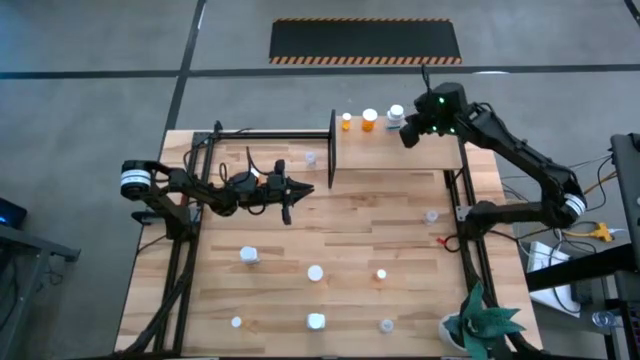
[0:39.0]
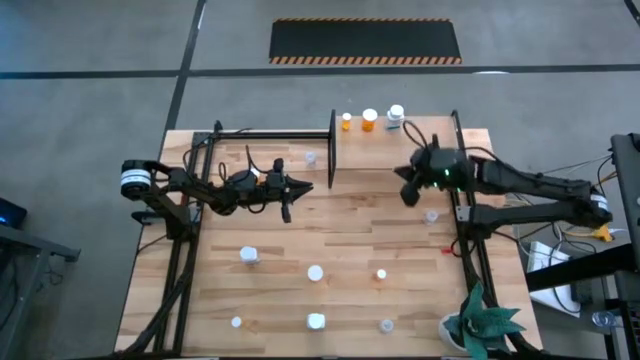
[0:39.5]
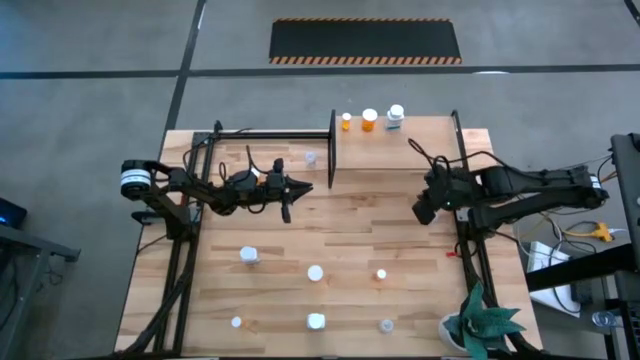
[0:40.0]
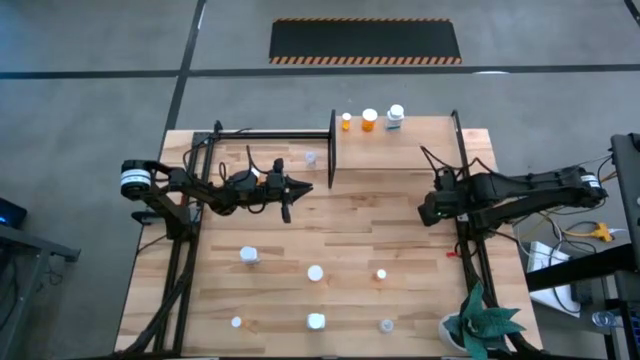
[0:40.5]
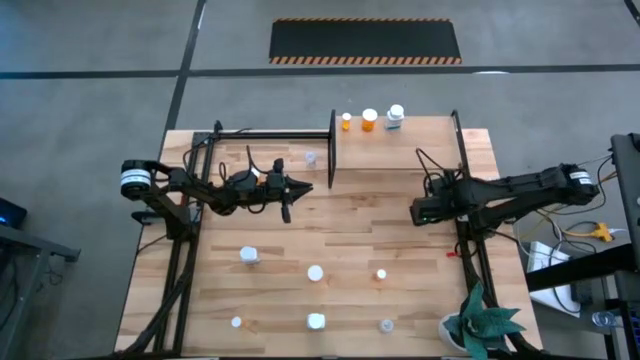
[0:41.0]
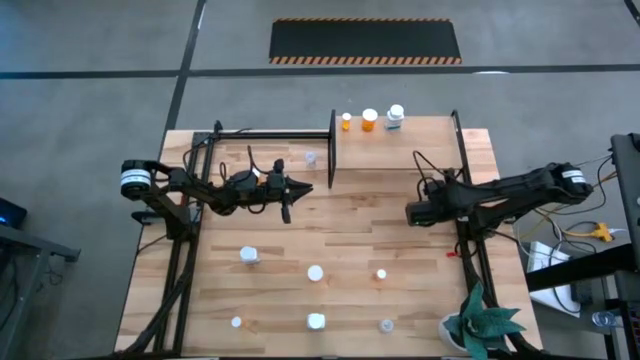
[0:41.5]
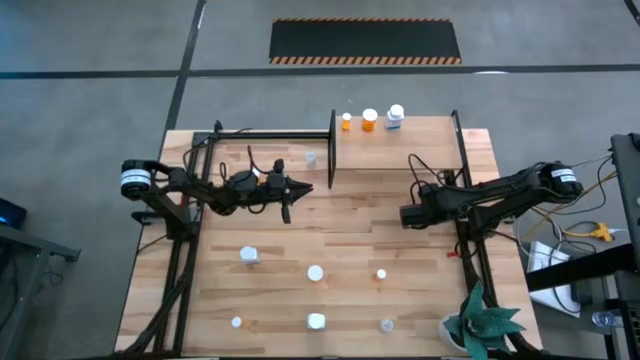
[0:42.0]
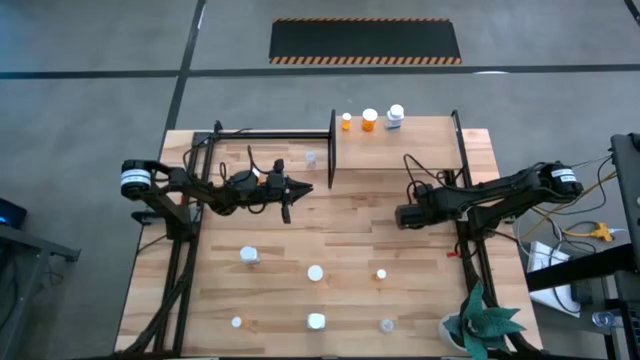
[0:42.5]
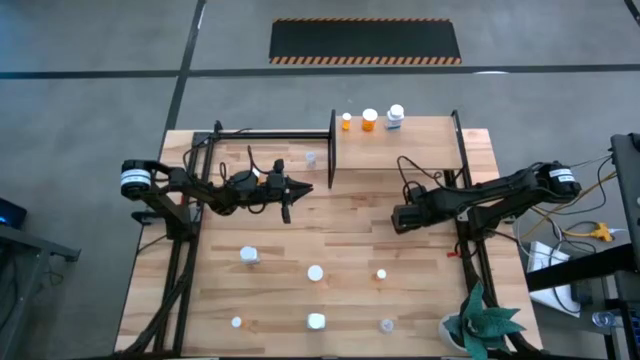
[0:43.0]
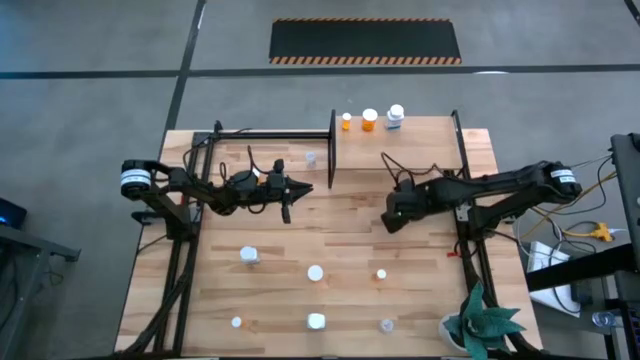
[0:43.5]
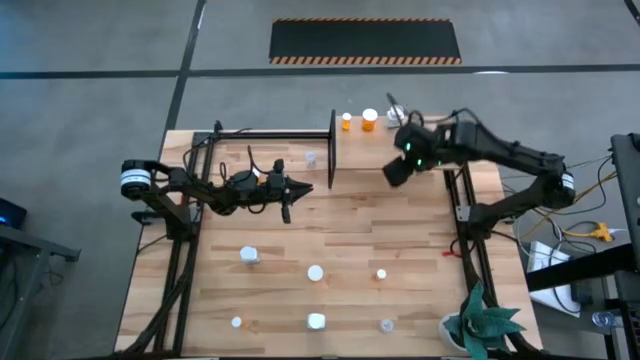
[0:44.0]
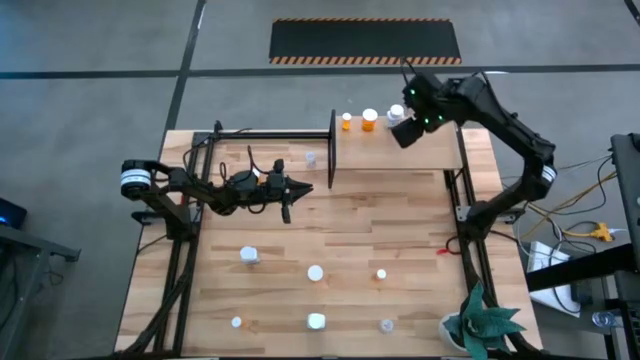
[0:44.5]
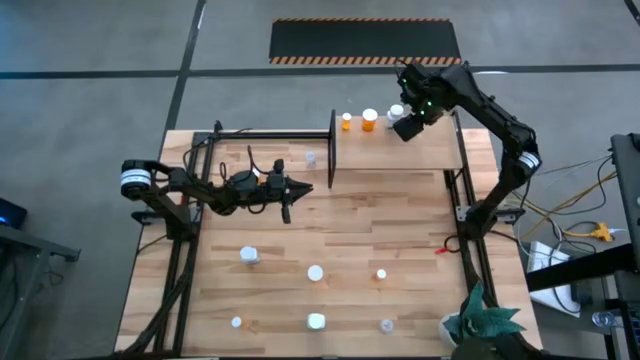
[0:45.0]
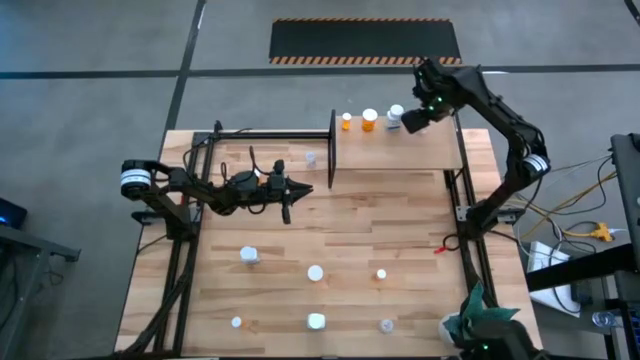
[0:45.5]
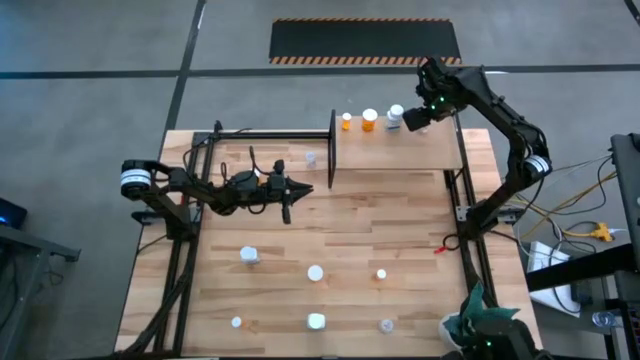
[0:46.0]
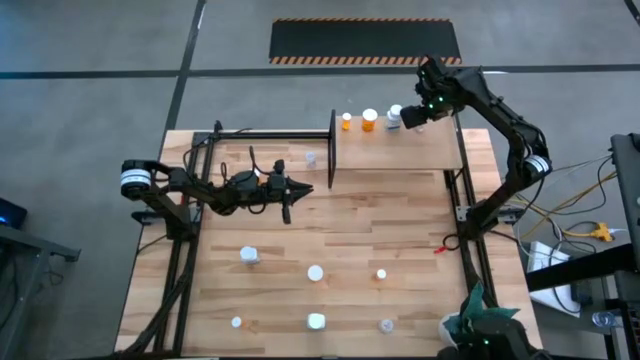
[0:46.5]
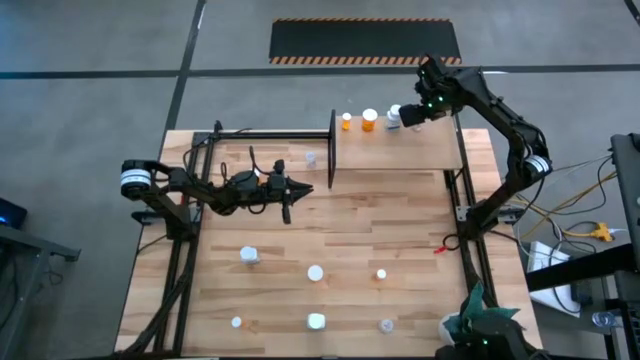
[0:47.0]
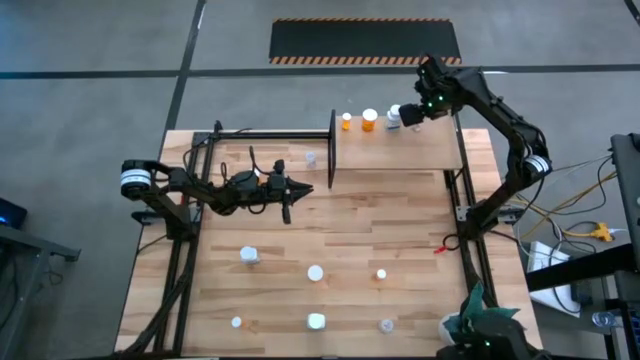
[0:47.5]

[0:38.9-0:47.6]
Task: Pick and place medicine bottles onto shelf by color
Put the middle transparent pill bottle on the shelf

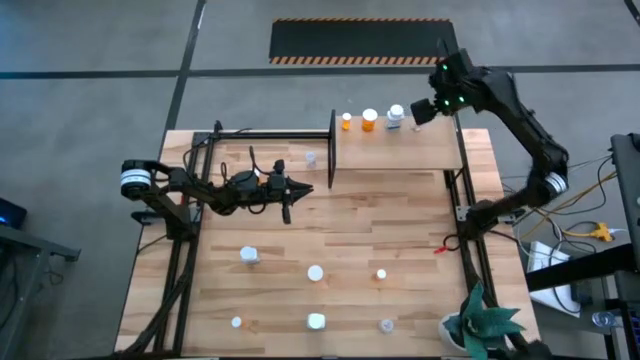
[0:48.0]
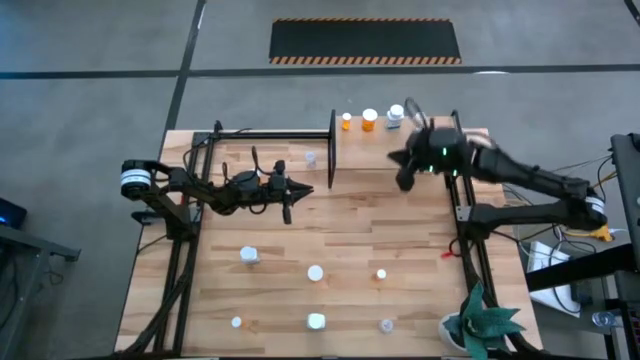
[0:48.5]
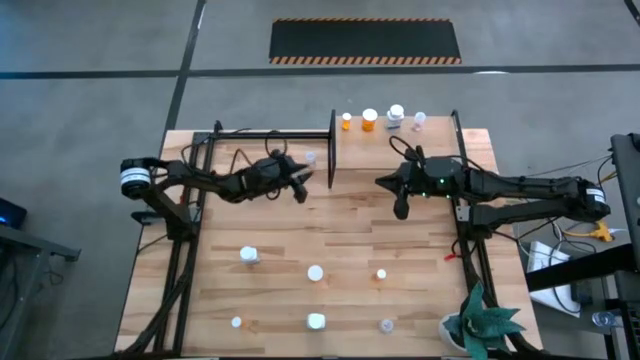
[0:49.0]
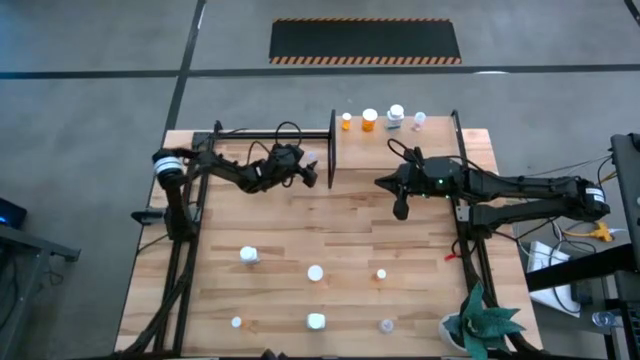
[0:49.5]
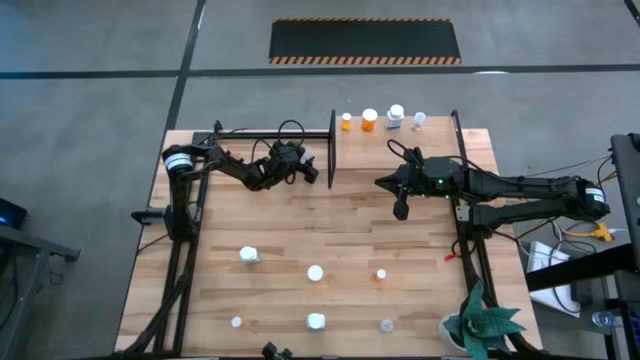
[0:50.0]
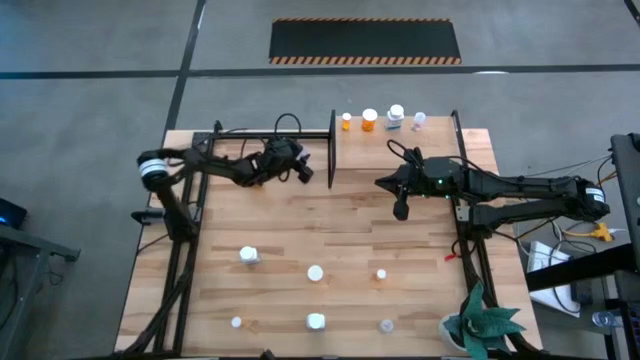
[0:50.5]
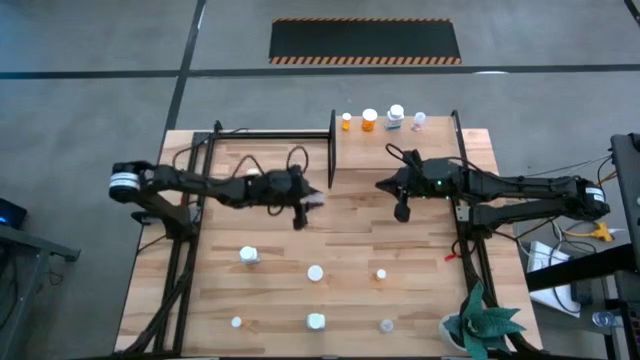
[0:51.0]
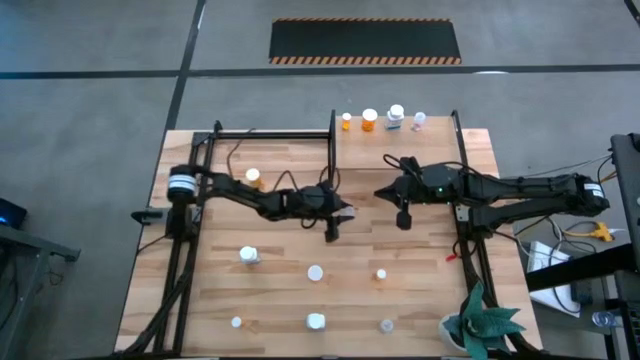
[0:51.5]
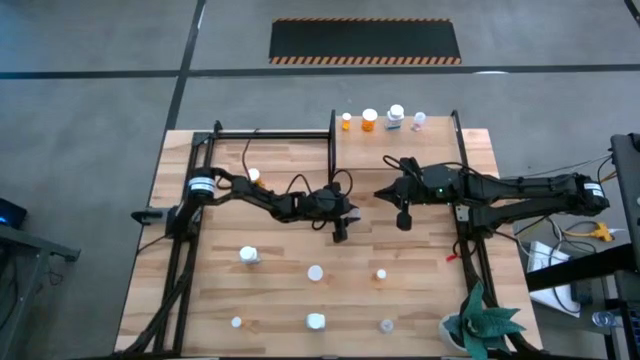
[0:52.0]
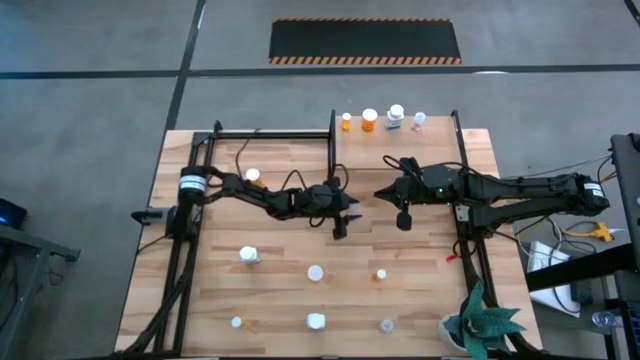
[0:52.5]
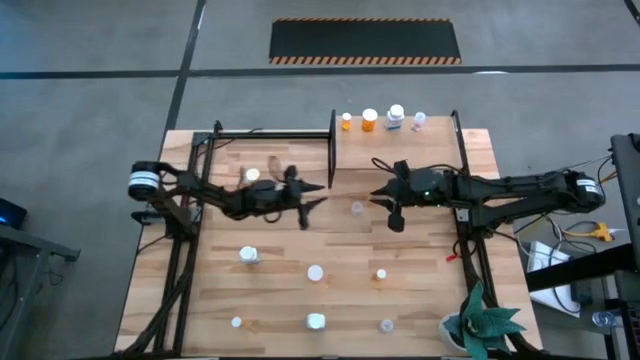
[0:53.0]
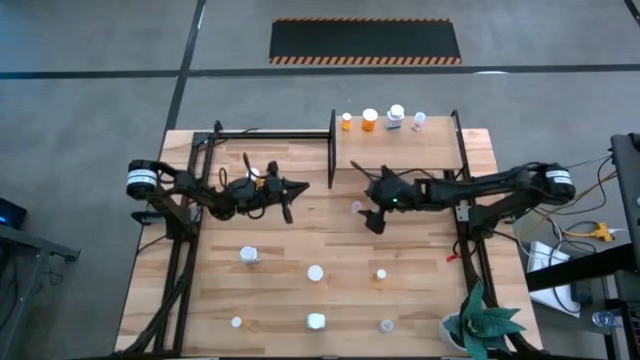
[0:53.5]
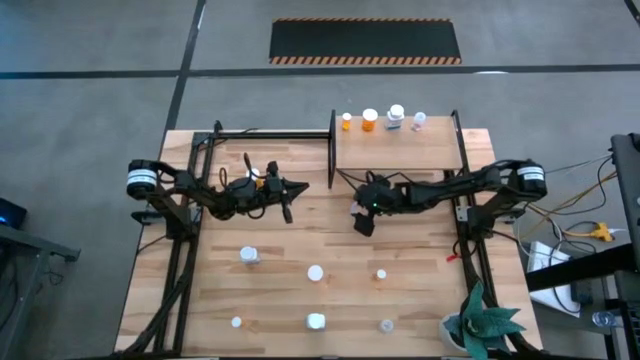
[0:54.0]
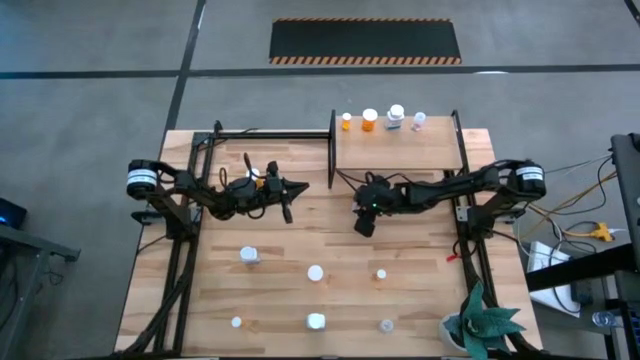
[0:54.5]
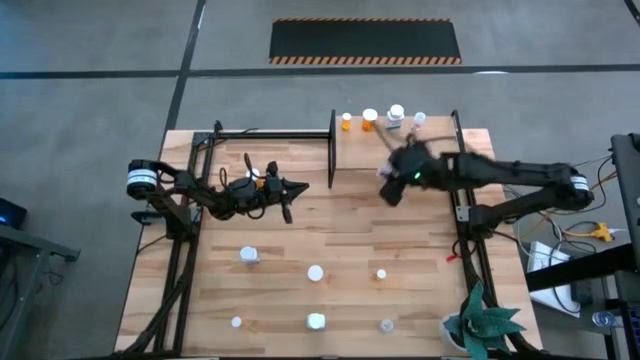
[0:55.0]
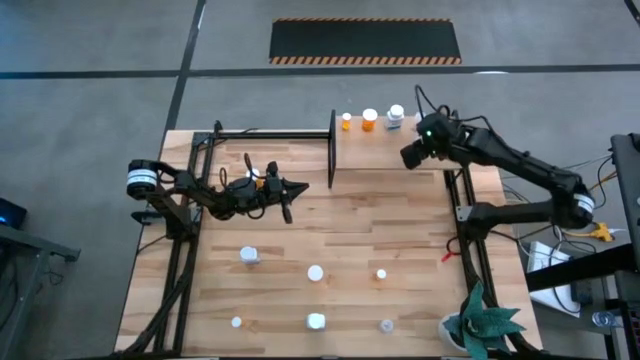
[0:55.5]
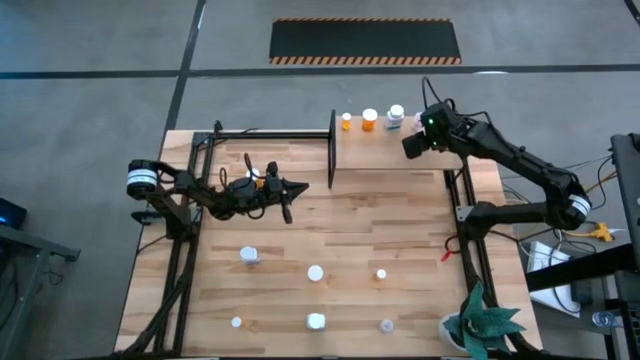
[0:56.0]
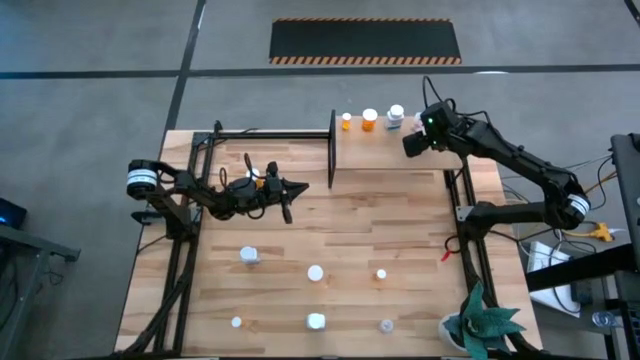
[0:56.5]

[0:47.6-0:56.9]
Put the top transparent pill bottle on the shelf aligned with the other transparent pill bottle

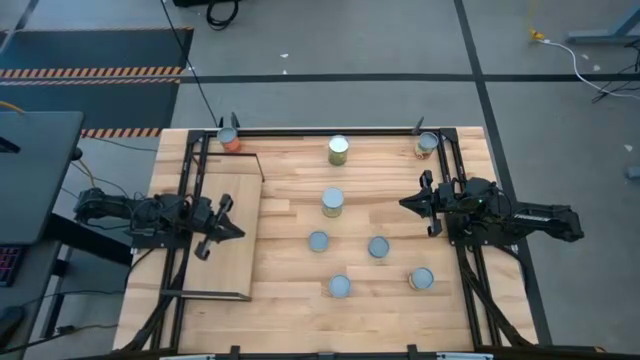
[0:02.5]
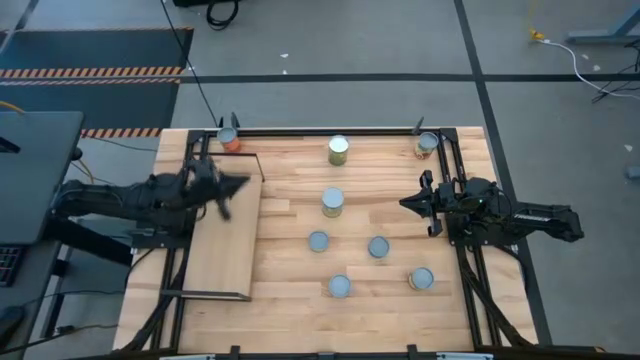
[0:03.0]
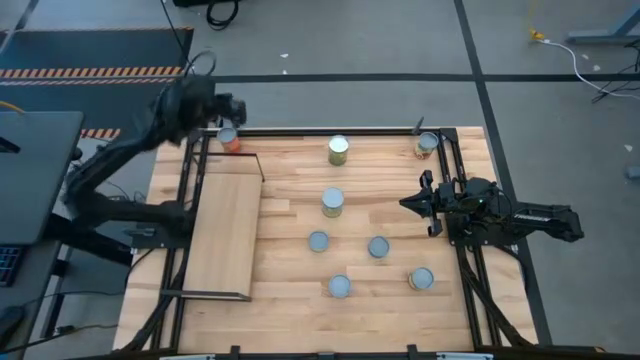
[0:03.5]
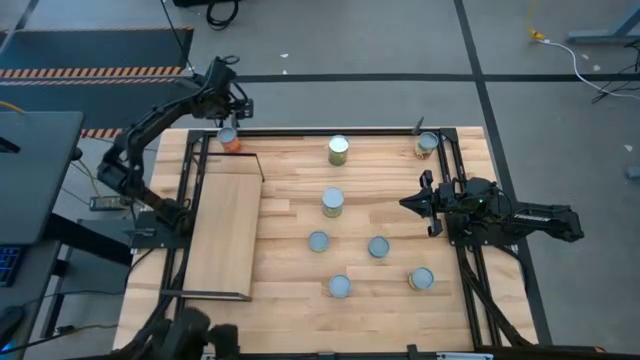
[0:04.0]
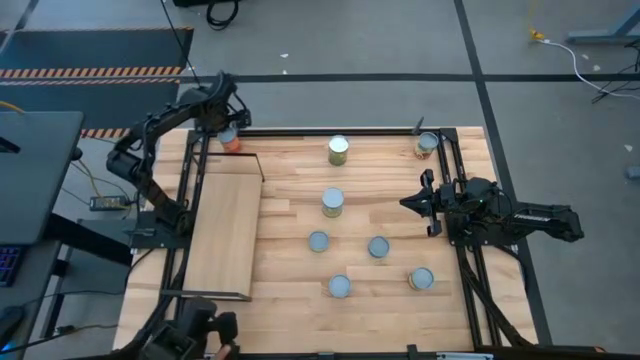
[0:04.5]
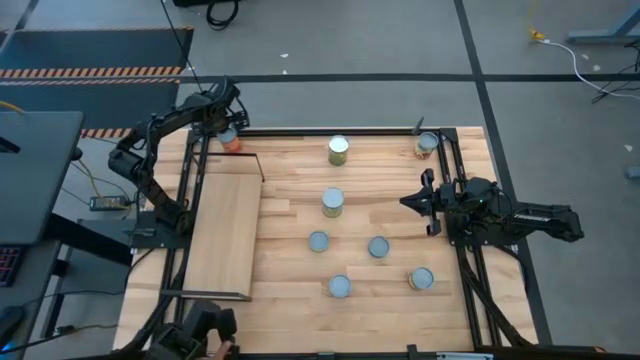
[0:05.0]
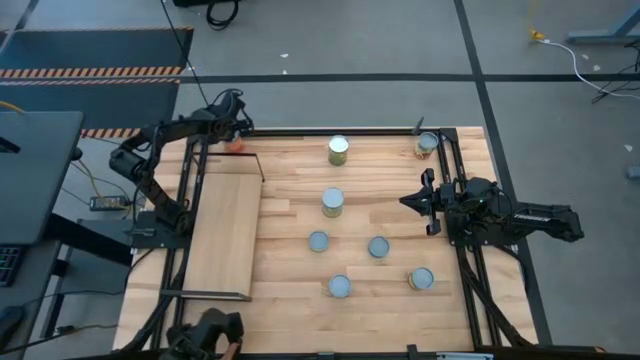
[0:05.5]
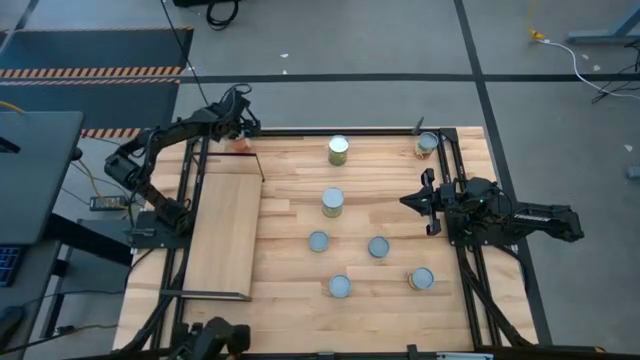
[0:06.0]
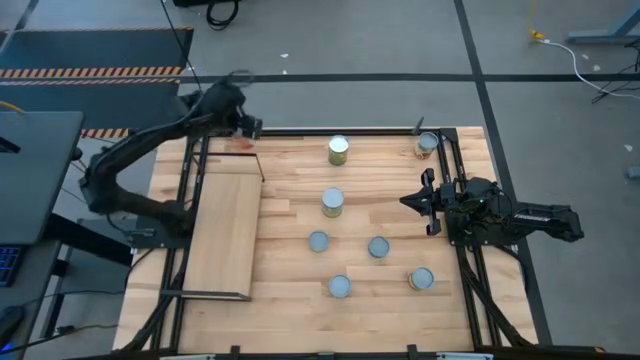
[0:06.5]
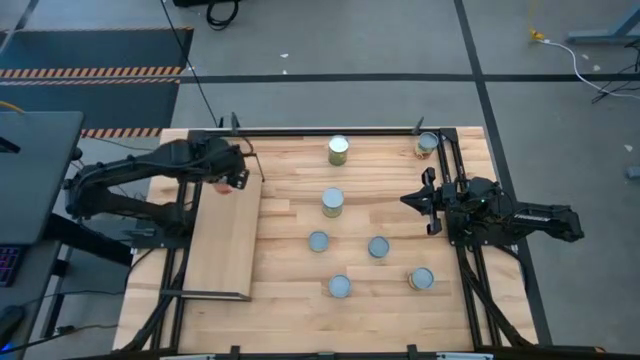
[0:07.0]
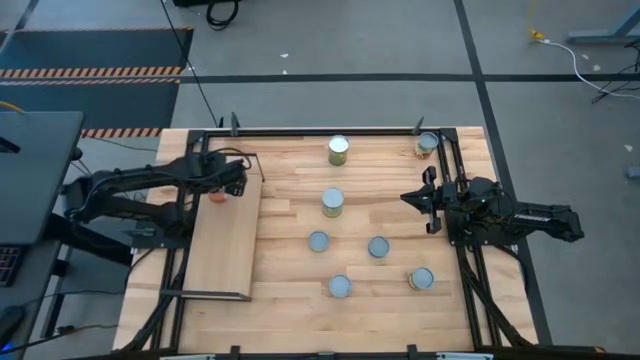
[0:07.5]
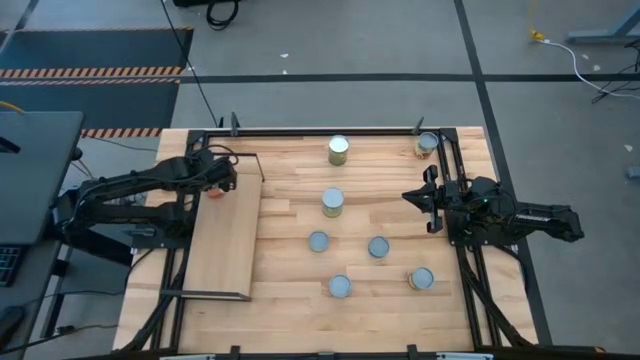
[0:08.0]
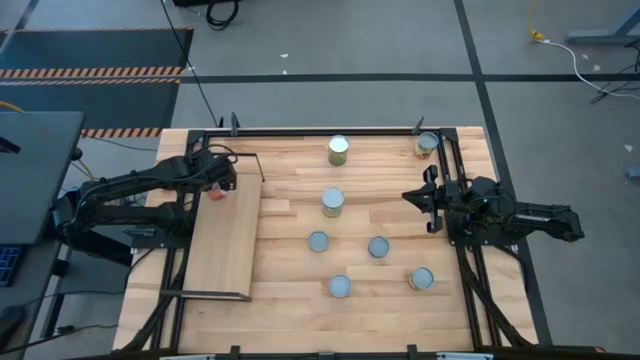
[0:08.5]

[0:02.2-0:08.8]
Task: Pick and place cans onto a shelf
Put the canned pineapple on the shelf
